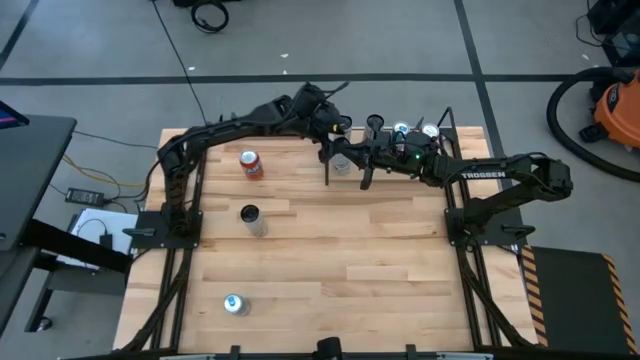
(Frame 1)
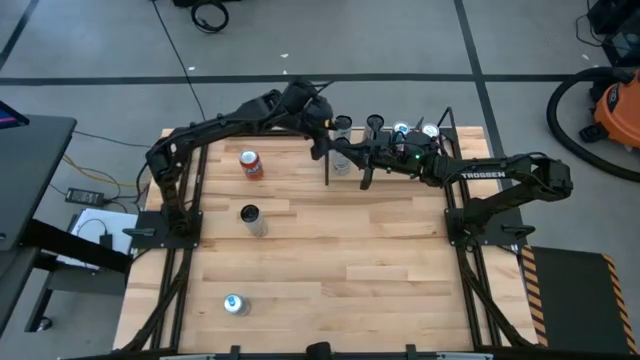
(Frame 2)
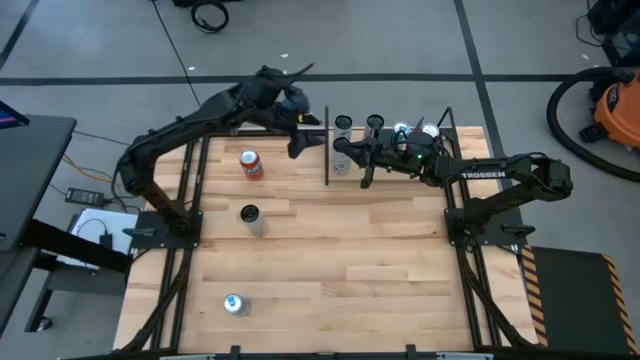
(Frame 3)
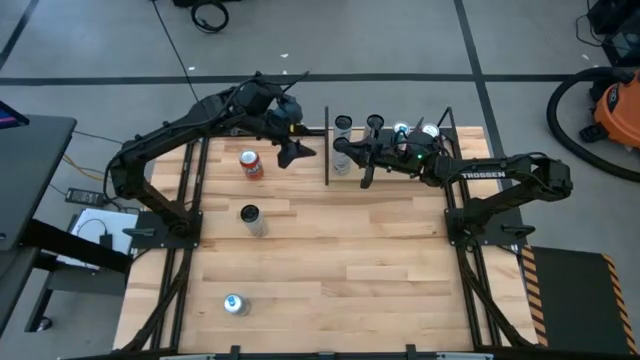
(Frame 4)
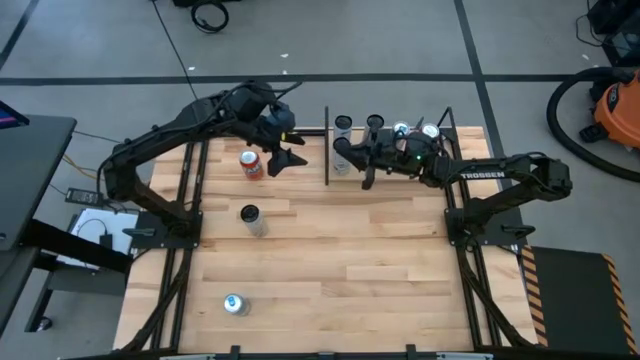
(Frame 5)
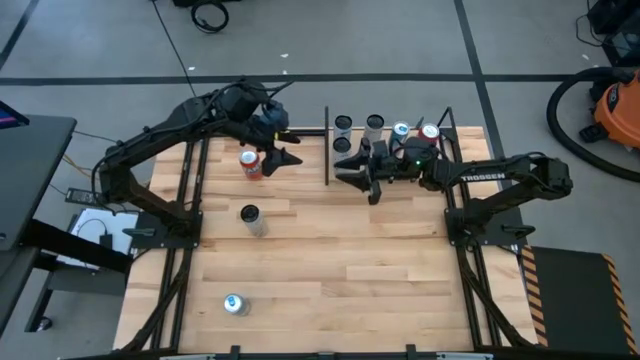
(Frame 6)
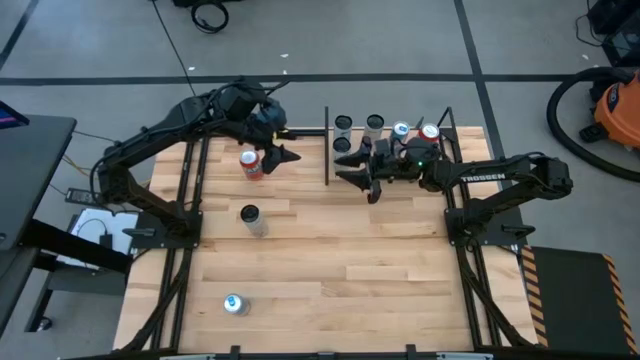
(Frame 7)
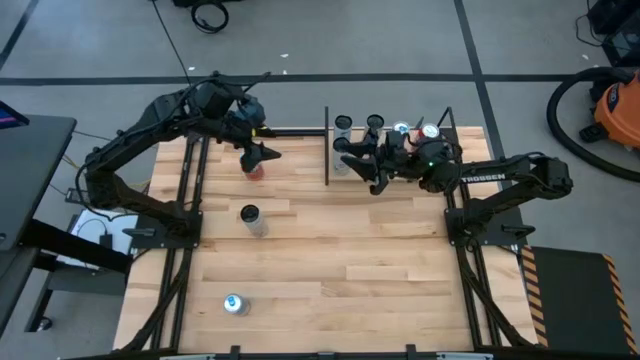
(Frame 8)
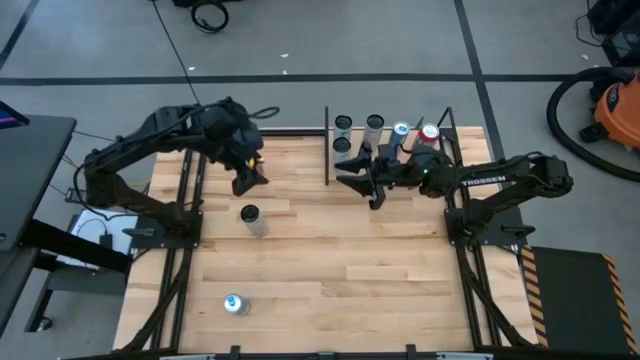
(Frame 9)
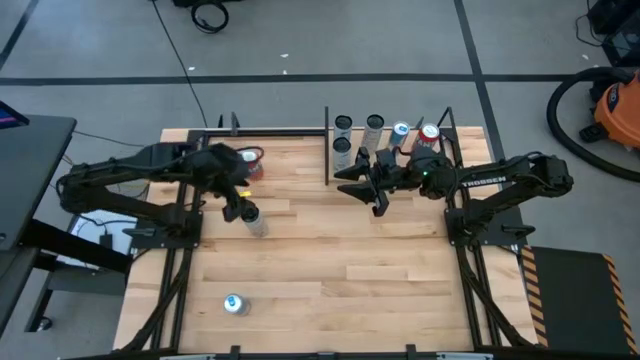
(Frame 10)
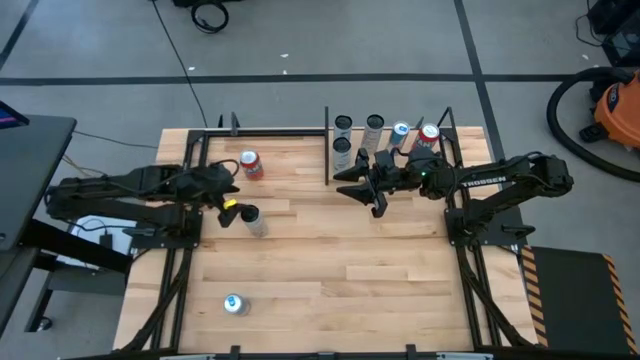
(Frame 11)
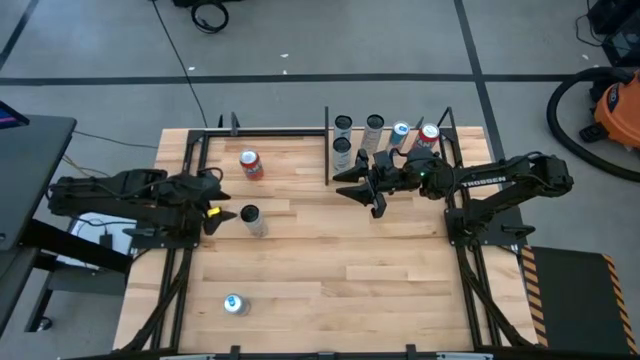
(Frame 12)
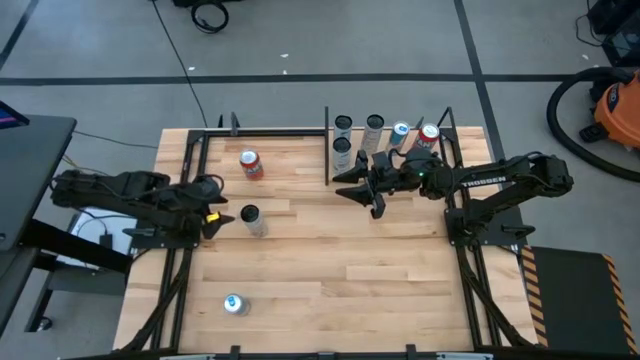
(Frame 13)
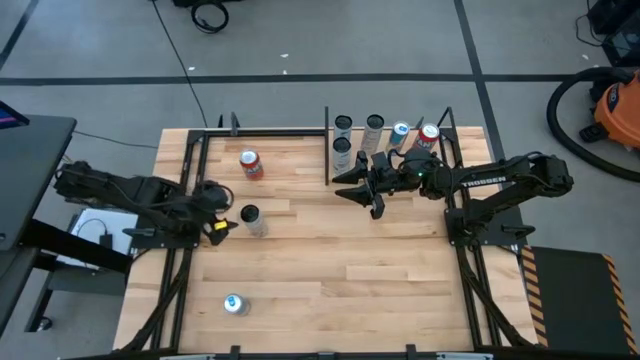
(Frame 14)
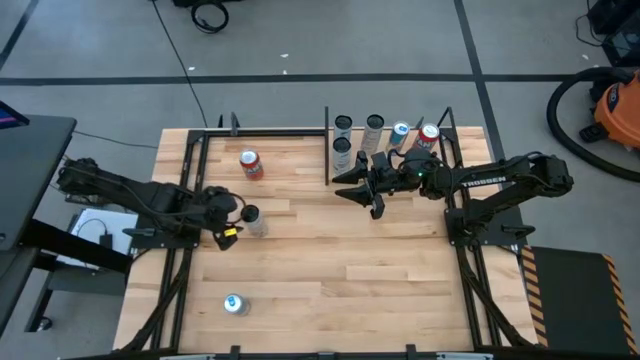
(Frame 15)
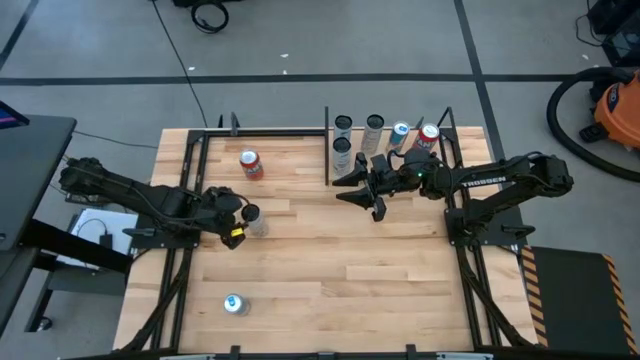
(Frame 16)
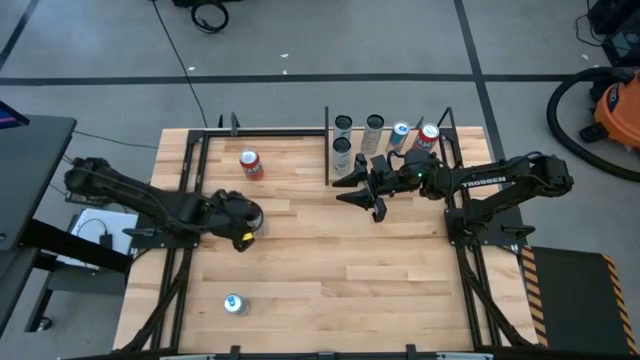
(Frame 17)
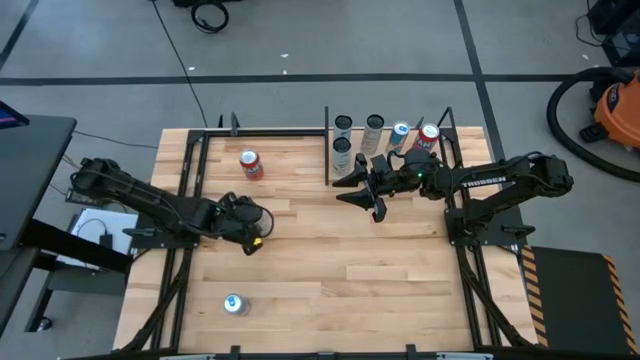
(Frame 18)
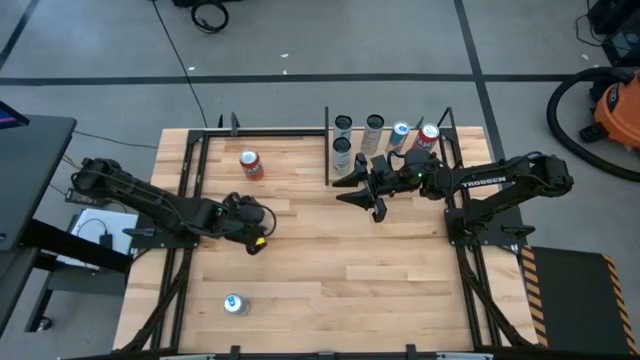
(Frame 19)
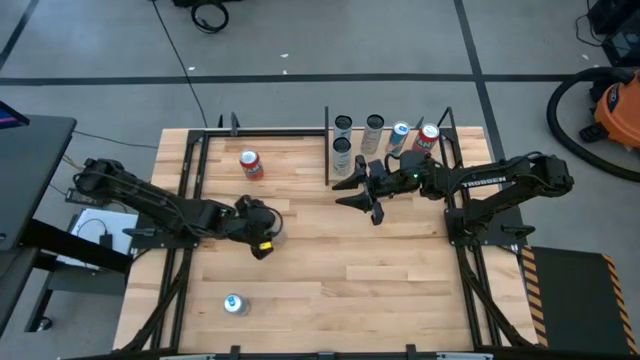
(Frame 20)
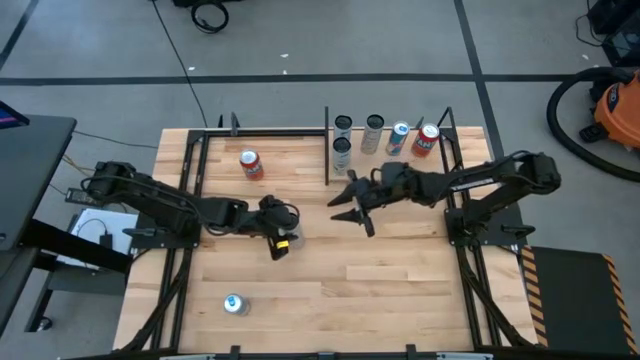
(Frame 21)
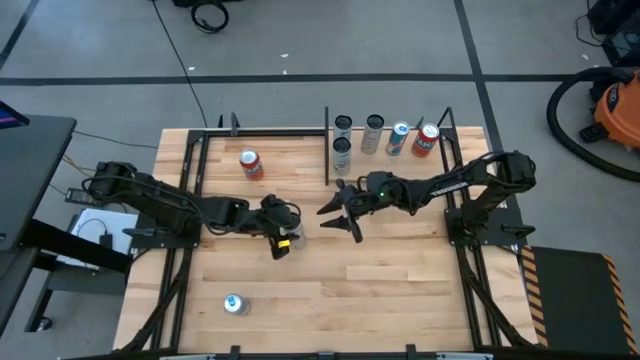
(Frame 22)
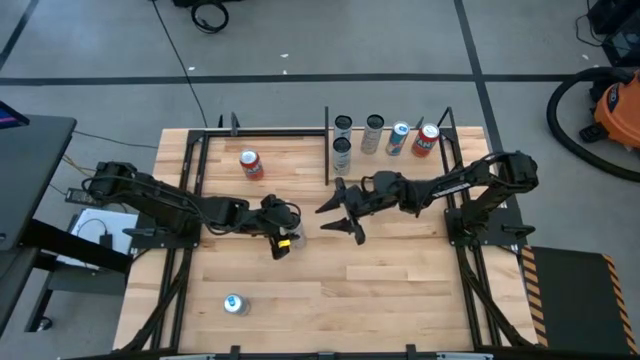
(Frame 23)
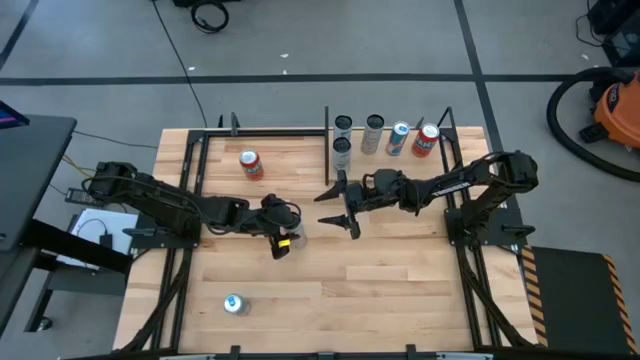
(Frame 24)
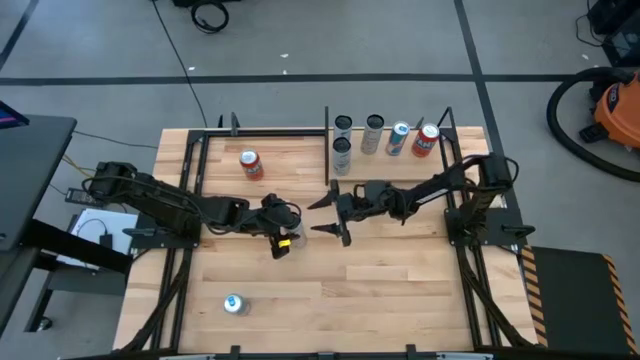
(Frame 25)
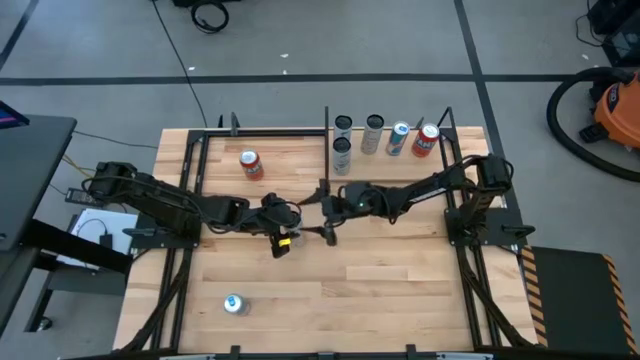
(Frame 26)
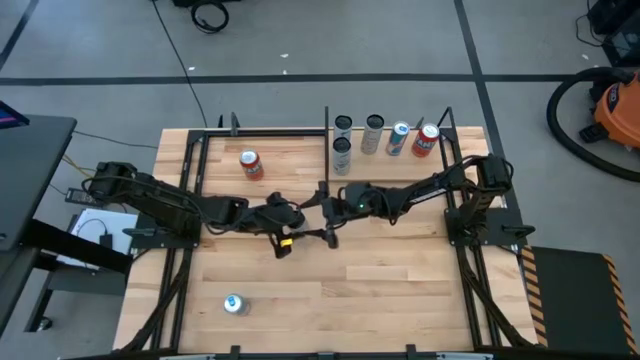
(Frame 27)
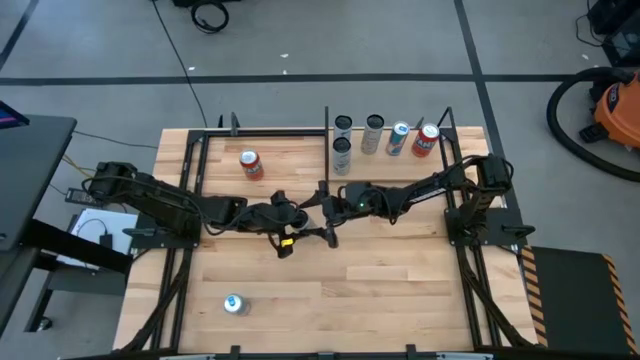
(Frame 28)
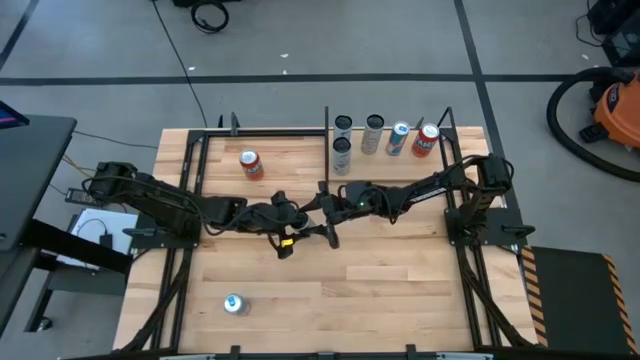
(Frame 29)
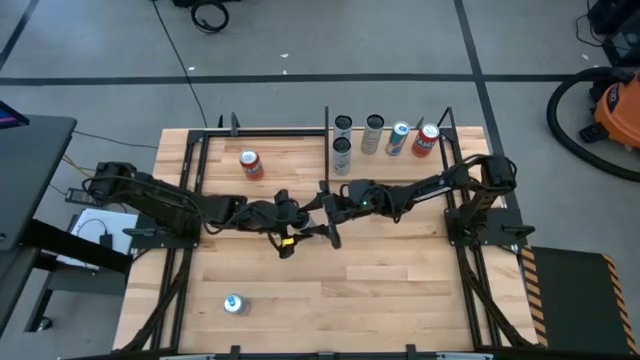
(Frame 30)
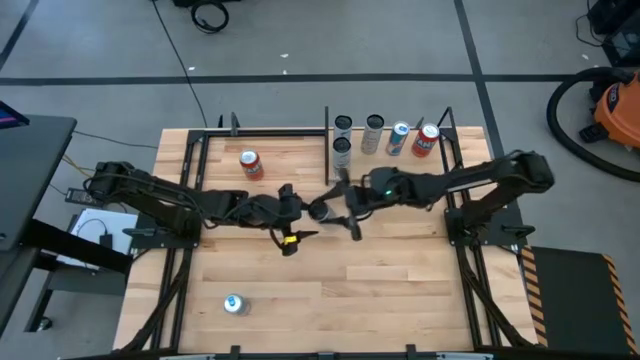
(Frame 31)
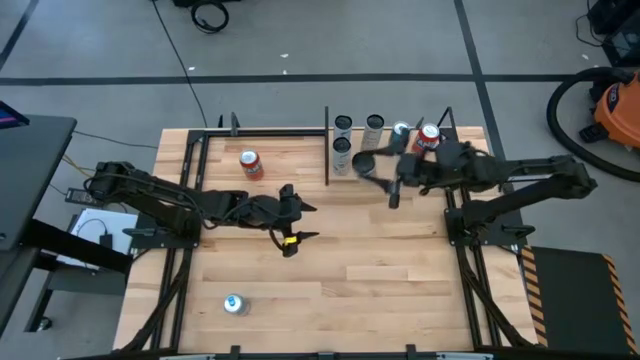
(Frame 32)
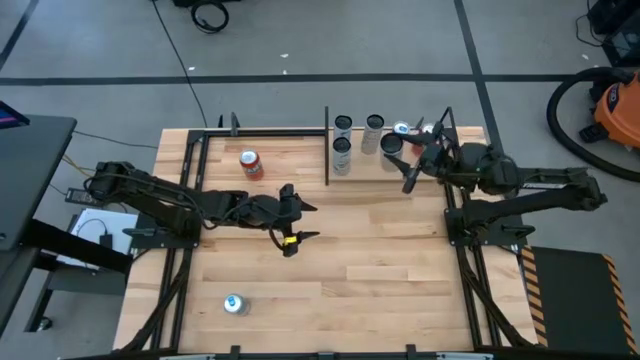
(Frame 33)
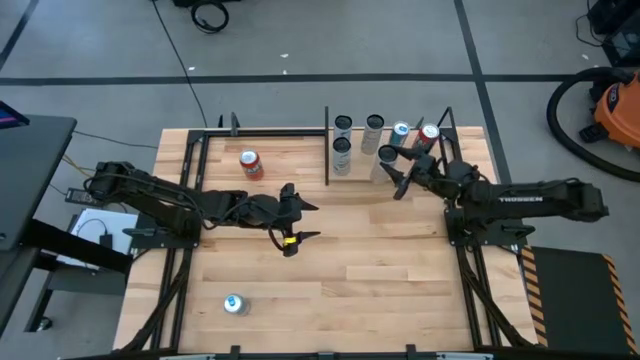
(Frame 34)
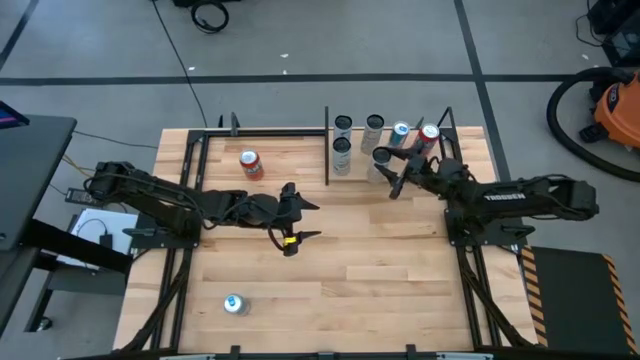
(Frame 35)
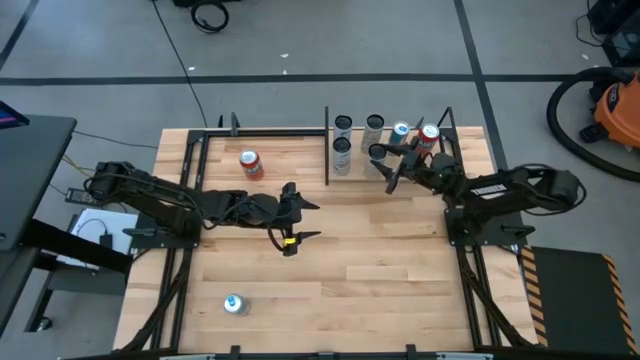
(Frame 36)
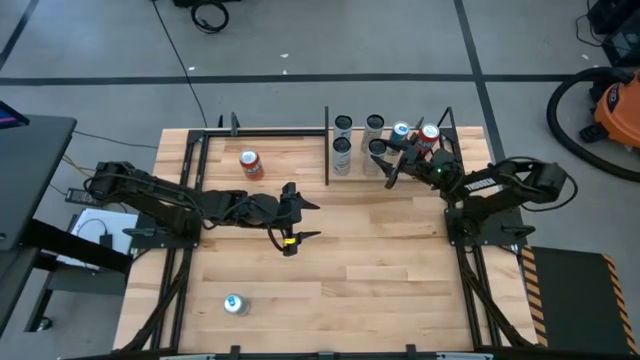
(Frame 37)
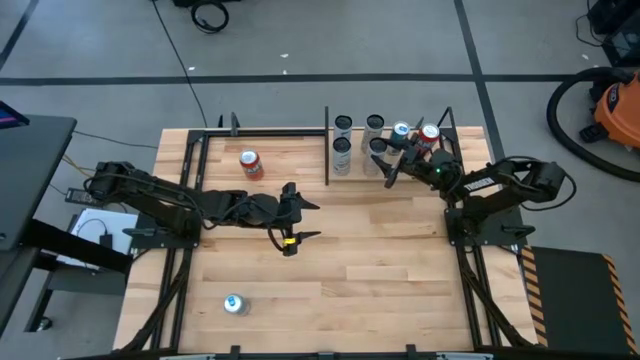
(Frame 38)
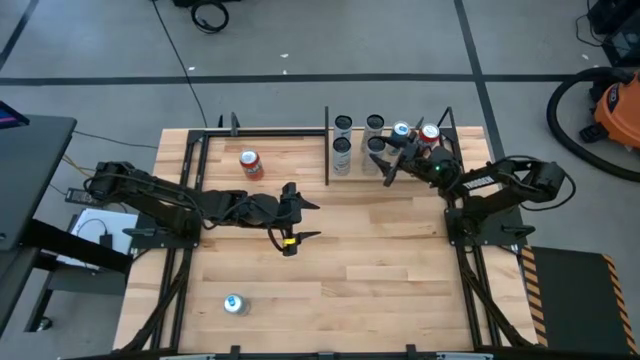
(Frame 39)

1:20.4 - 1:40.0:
Task: Place canned beverage on shelf
Put the white yellow soda can on the shelf aligned with the other yellow white soda can
